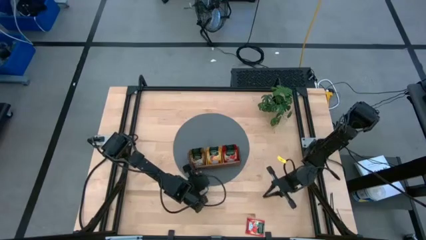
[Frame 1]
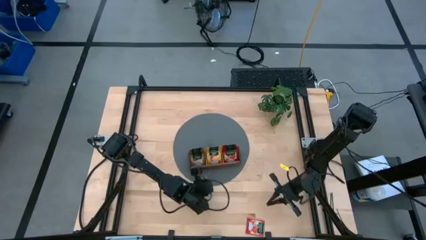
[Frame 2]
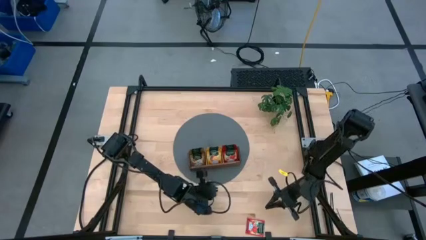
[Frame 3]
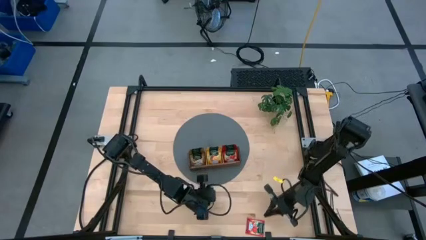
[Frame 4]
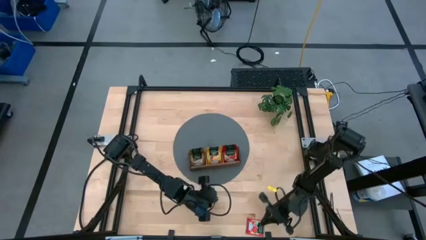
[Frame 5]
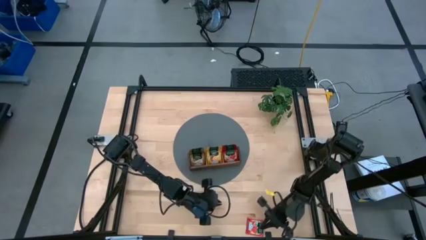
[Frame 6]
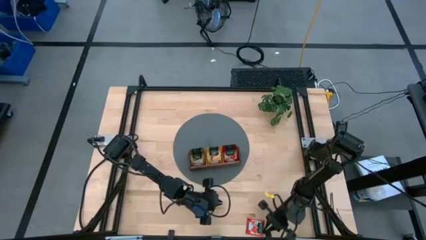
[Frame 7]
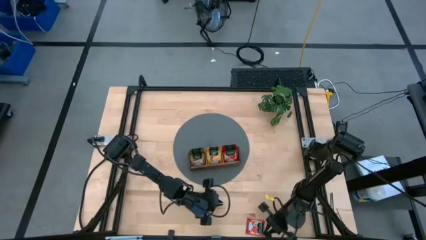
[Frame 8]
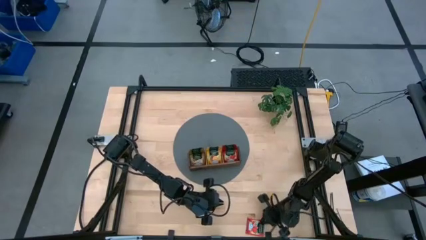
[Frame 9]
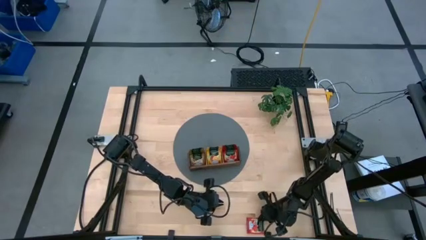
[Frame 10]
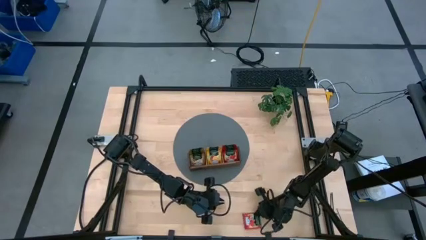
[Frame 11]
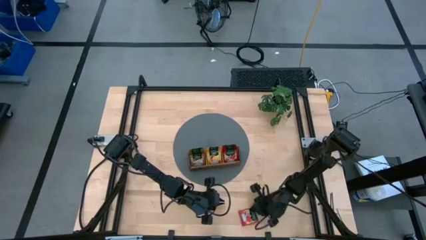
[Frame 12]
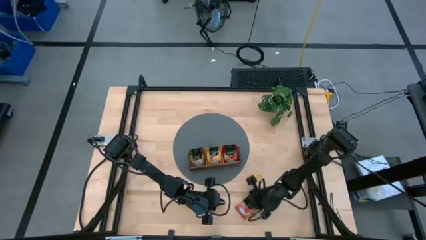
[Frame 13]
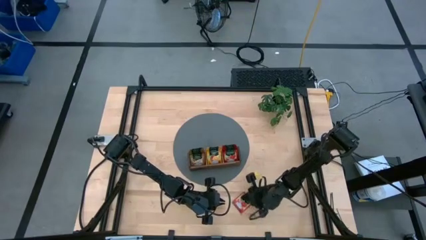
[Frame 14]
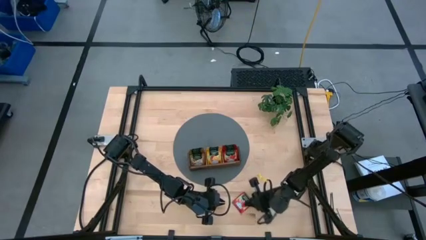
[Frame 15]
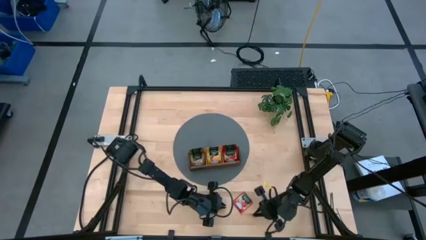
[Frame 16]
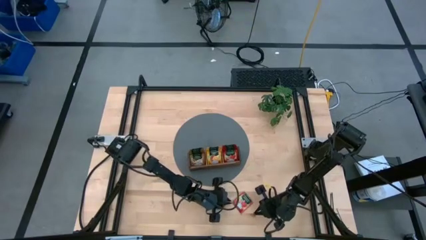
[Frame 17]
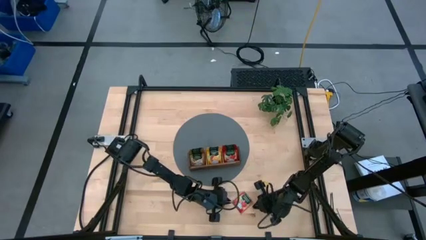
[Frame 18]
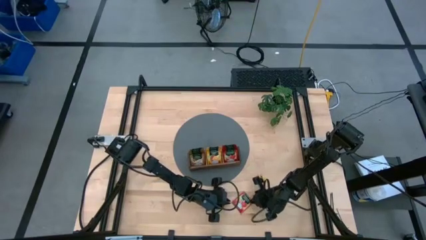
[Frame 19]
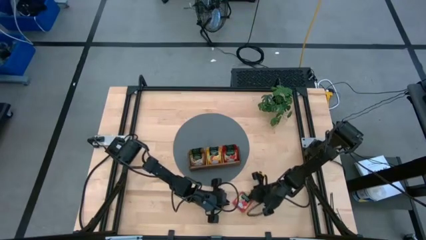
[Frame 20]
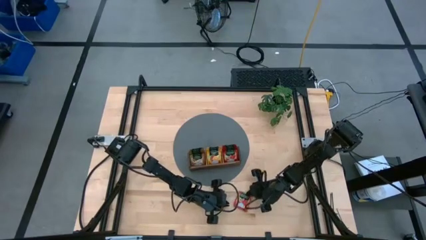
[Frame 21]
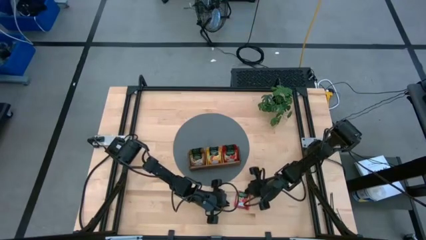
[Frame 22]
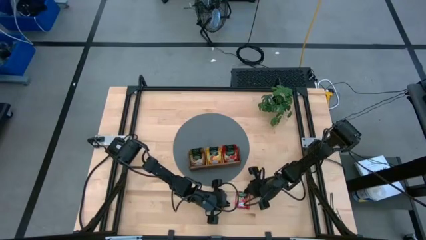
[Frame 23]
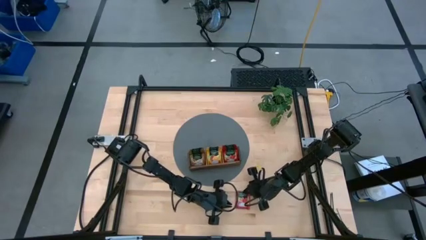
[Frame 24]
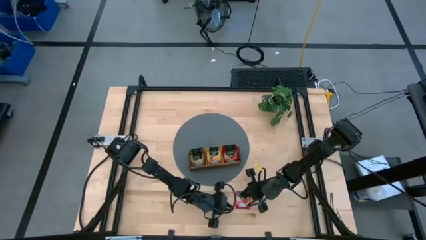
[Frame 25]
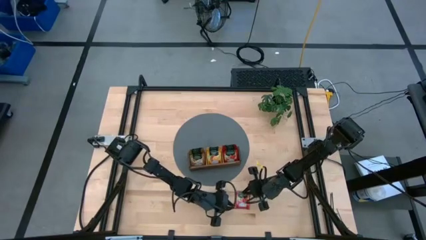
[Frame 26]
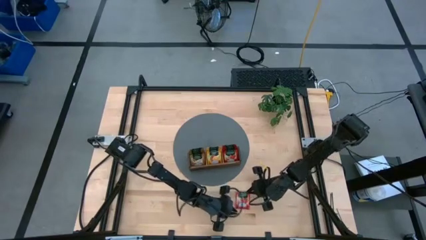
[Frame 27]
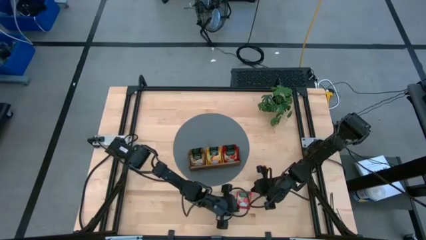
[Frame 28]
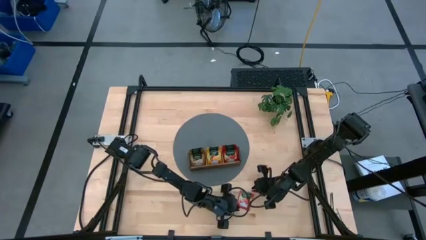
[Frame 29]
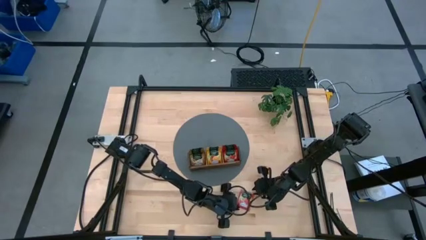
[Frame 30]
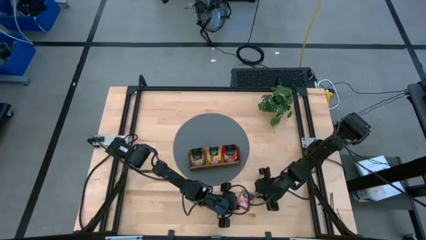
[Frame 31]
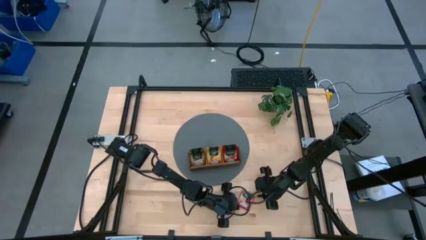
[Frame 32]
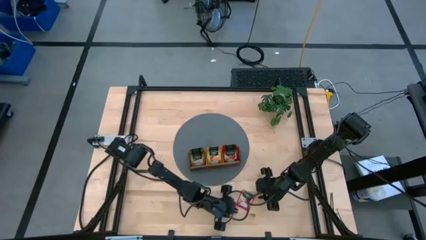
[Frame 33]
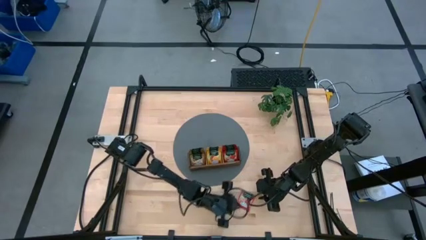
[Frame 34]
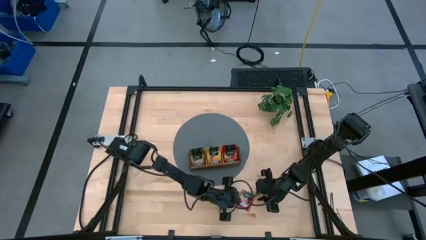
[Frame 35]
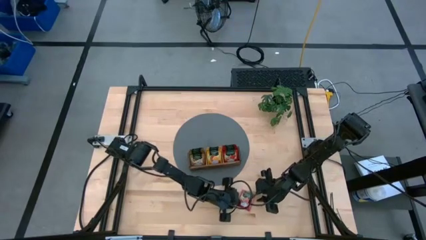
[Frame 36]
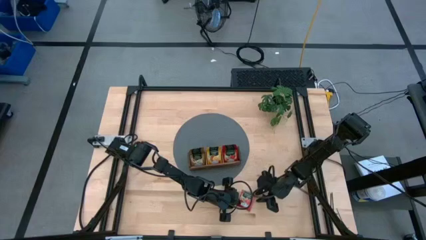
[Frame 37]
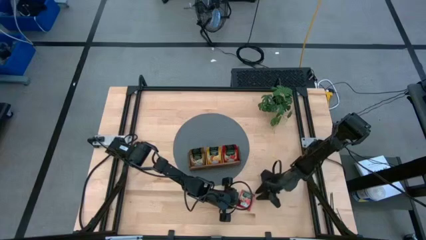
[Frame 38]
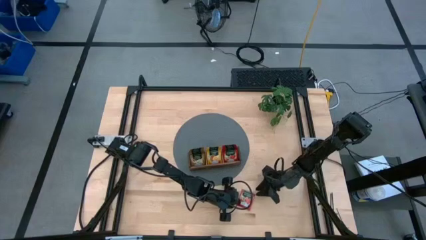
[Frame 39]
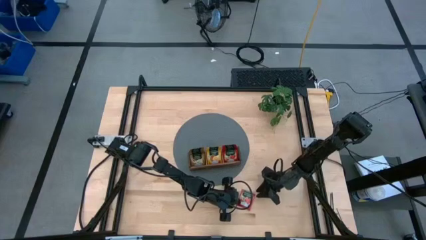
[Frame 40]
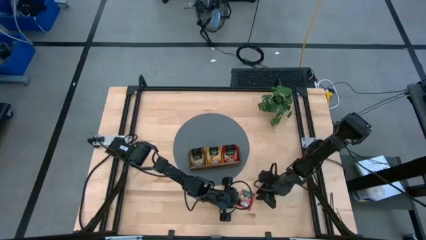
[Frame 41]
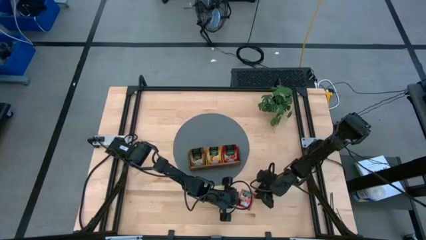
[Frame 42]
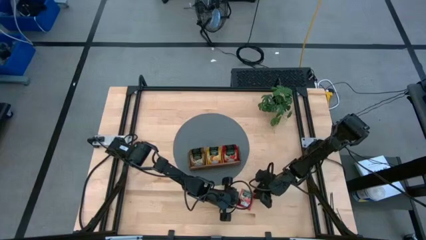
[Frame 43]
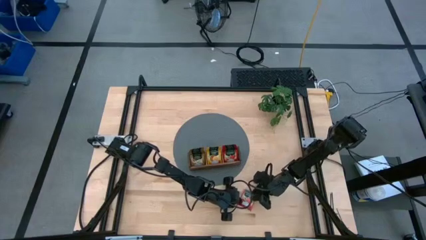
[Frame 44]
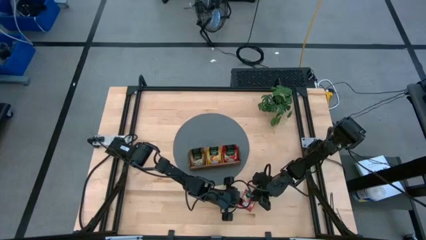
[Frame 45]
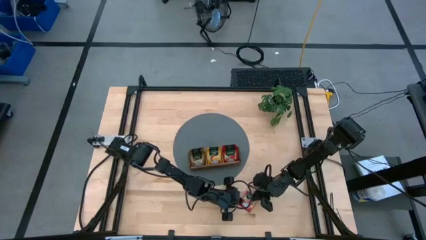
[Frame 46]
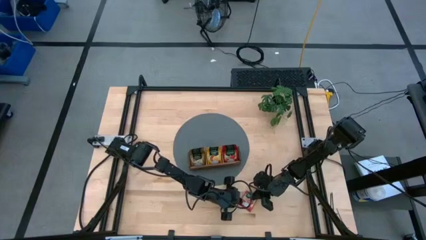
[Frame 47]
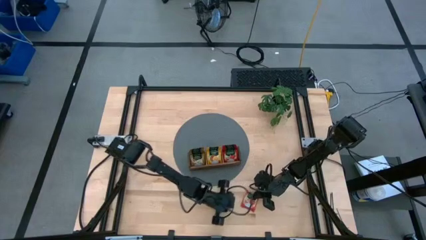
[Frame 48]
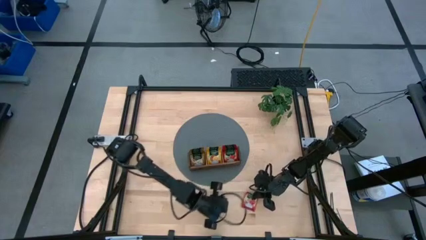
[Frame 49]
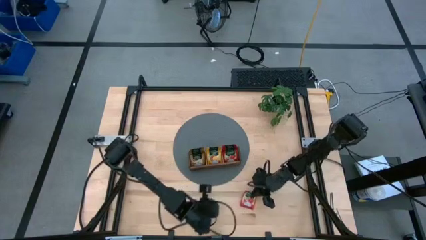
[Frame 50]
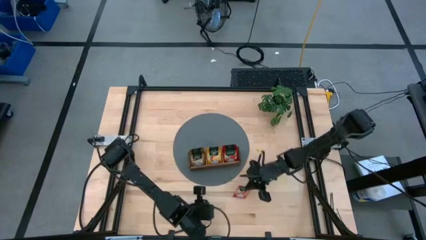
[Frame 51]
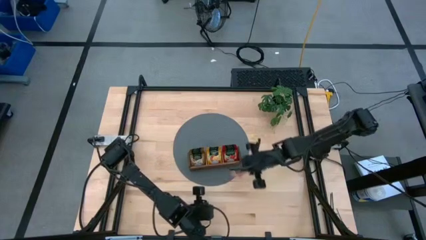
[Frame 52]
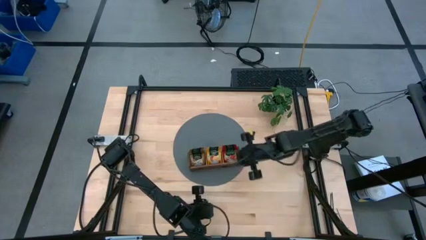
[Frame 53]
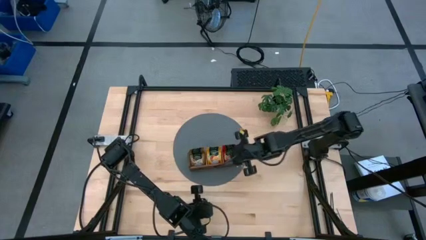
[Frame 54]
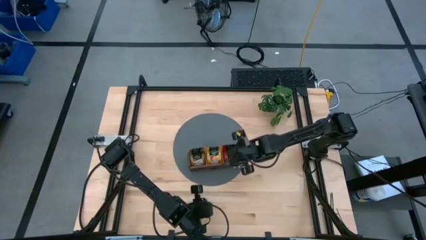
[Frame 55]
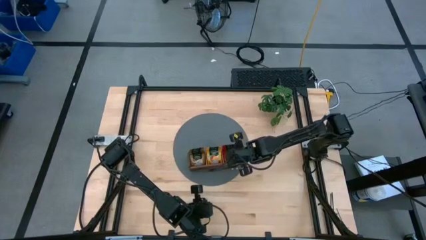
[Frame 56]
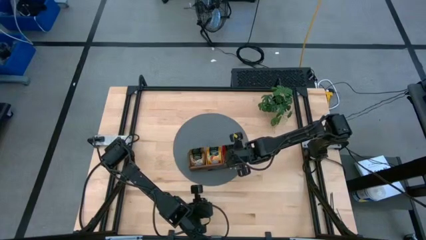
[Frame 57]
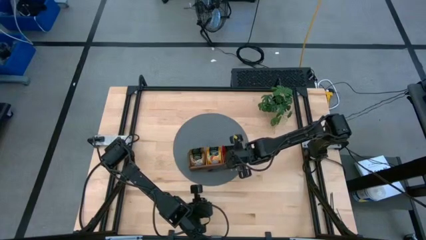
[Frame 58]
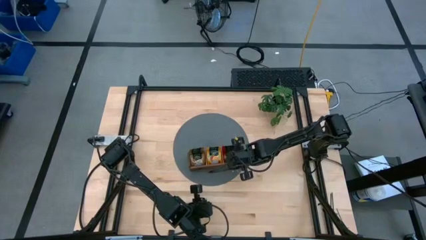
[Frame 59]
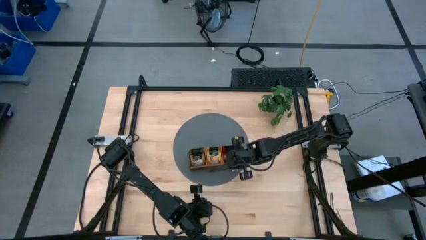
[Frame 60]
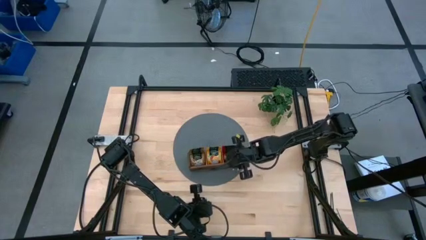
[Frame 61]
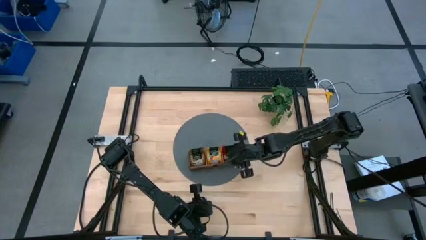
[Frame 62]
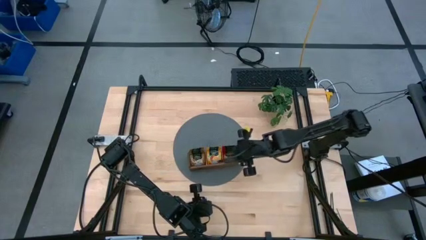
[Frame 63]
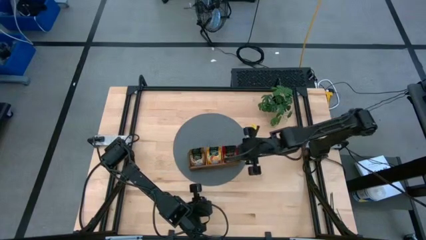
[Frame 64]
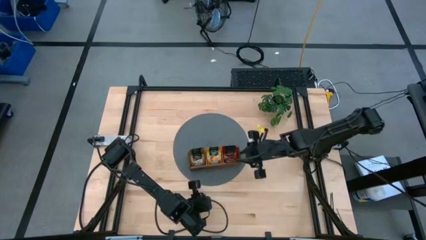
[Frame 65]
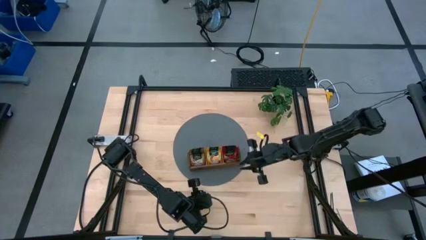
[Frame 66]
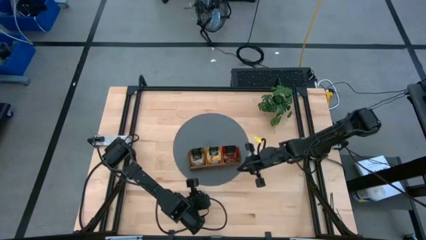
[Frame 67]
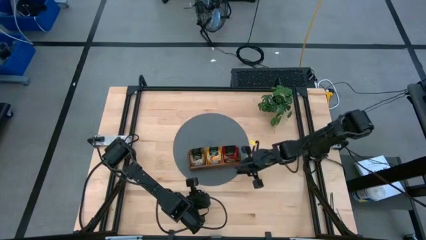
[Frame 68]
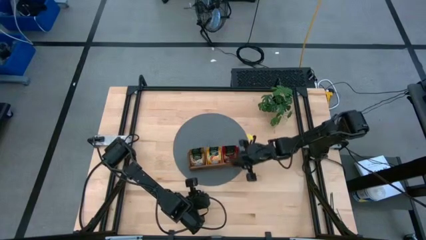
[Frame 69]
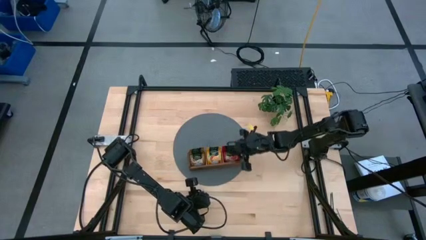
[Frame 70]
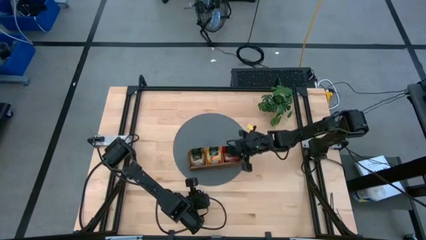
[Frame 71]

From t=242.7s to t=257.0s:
Task: Pick & Place Tea
Put the red tea bag into the right section of the wooden organizer

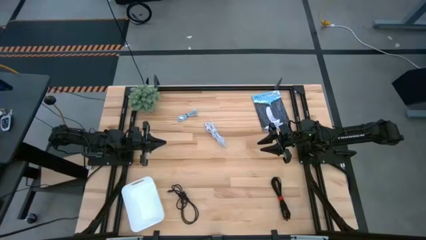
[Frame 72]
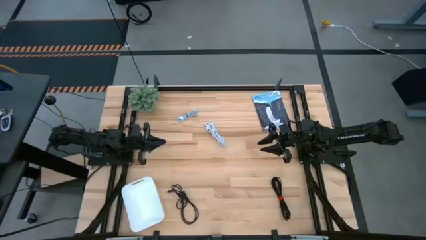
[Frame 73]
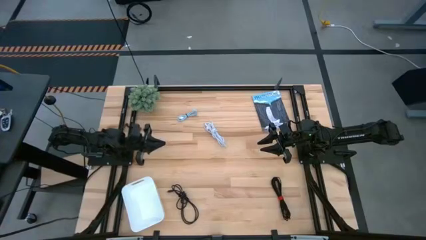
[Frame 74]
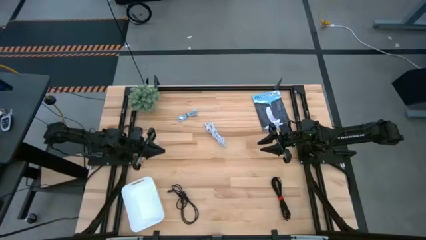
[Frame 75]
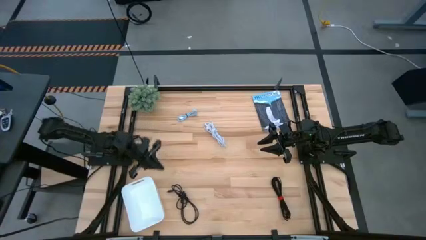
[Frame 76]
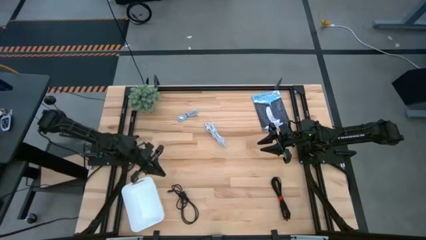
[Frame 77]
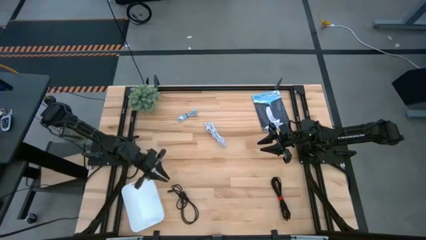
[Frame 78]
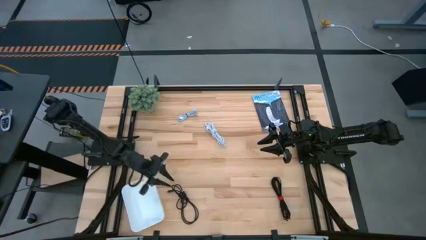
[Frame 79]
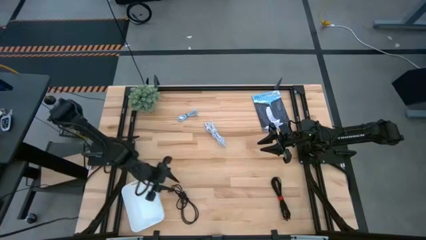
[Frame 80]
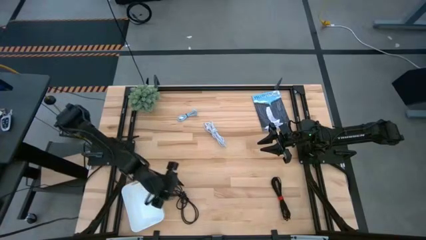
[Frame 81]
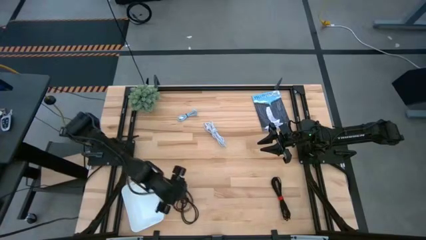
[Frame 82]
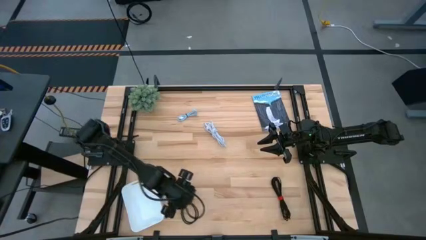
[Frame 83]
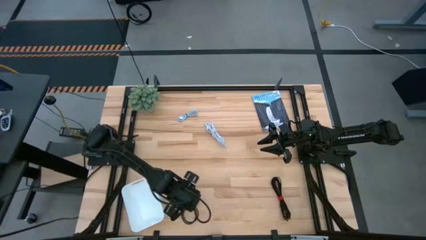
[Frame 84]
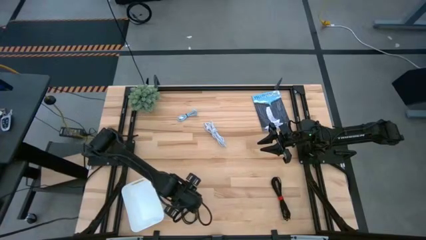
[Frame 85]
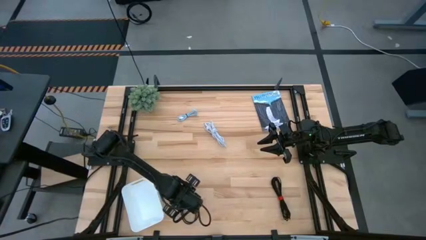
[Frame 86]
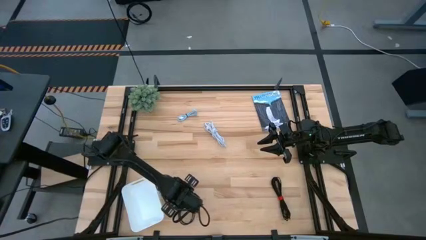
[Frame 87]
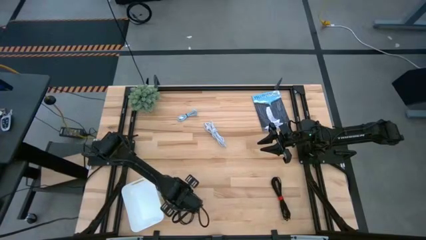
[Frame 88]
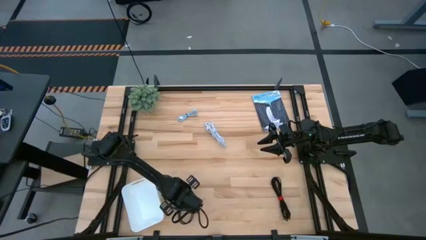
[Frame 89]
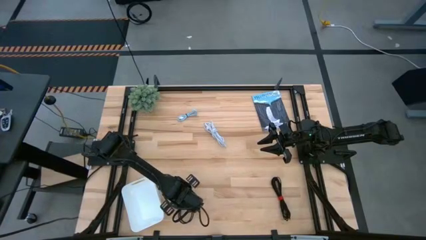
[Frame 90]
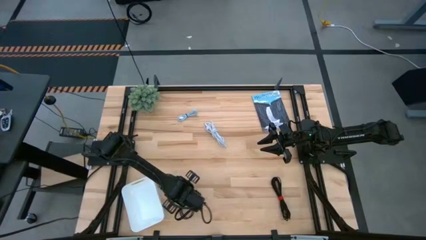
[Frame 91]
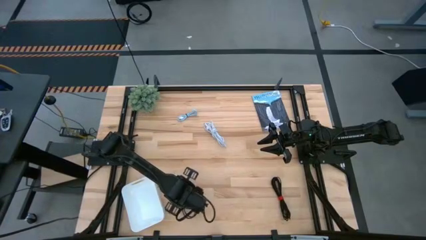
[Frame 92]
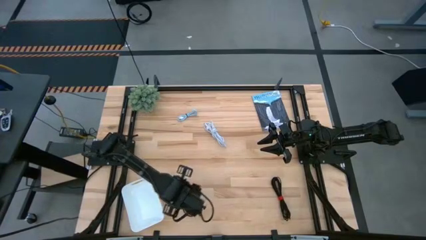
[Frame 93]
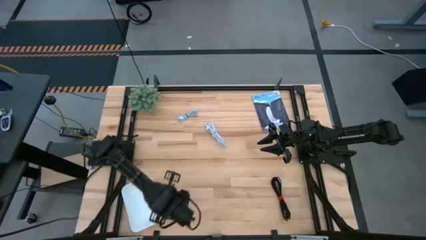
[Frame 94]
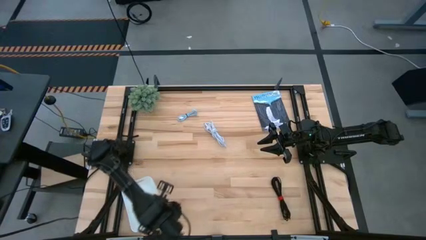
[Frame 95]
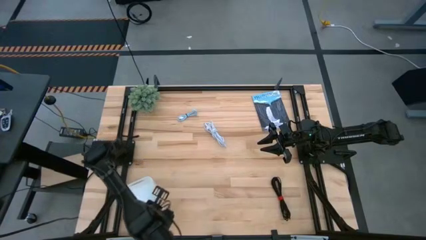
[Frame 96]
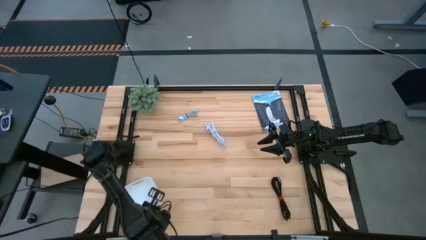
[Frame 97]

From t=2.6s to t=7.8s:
Task: Pick and place USB-C Cables
Put the left black usb cable into the white bin
